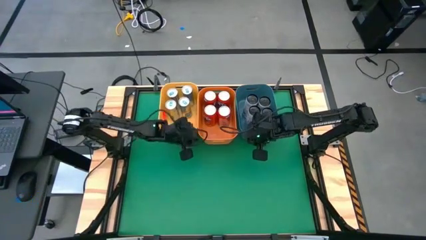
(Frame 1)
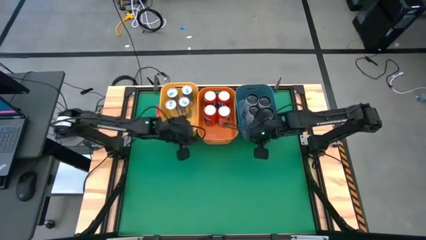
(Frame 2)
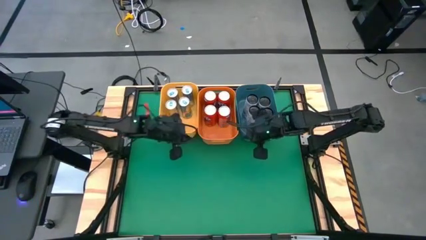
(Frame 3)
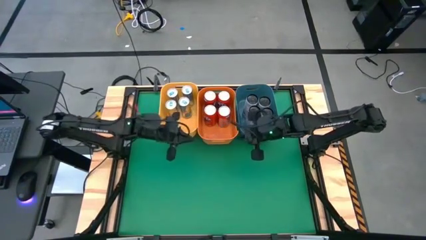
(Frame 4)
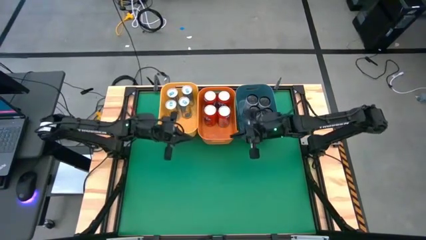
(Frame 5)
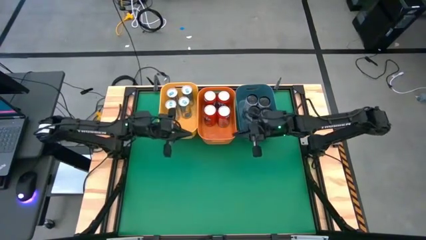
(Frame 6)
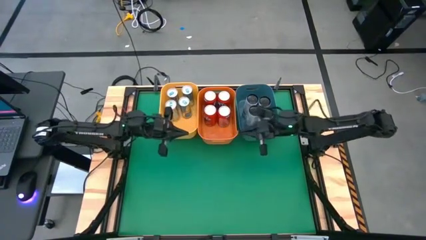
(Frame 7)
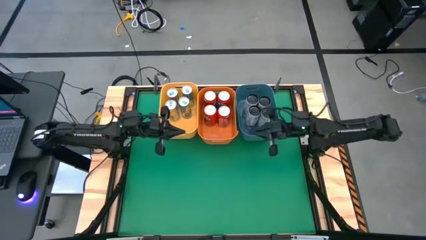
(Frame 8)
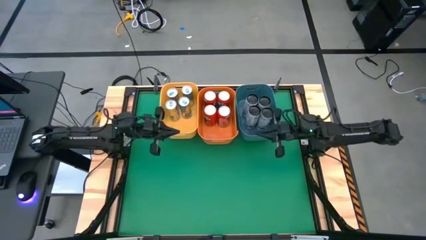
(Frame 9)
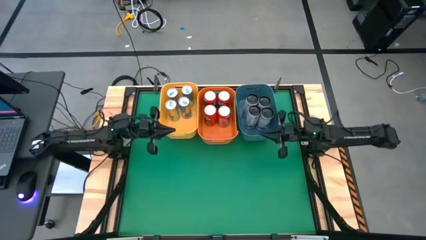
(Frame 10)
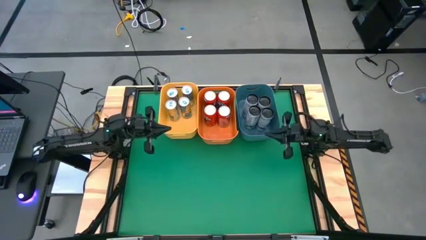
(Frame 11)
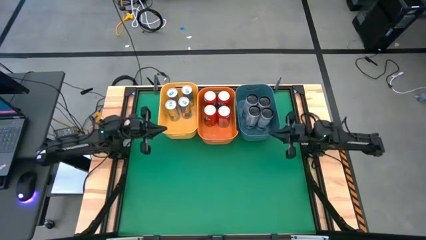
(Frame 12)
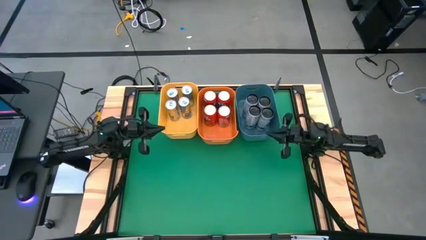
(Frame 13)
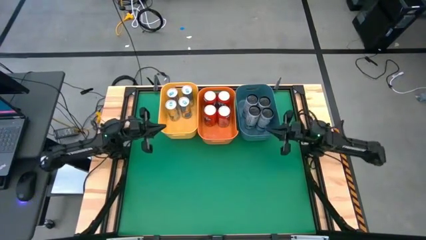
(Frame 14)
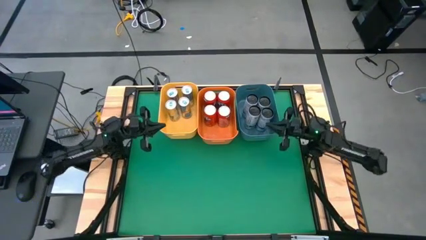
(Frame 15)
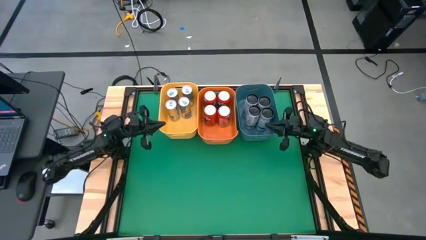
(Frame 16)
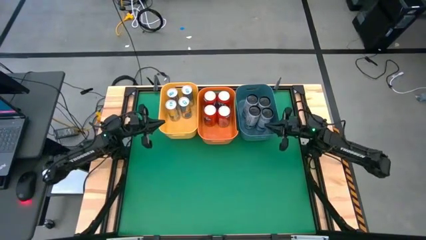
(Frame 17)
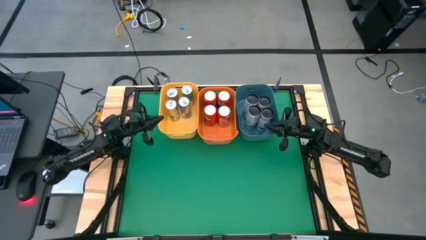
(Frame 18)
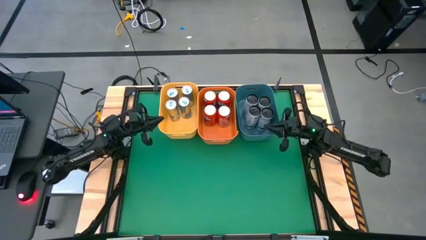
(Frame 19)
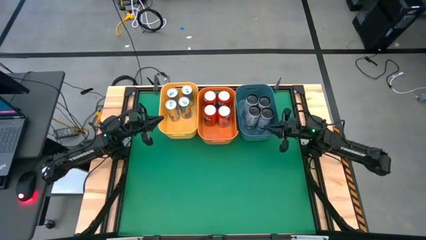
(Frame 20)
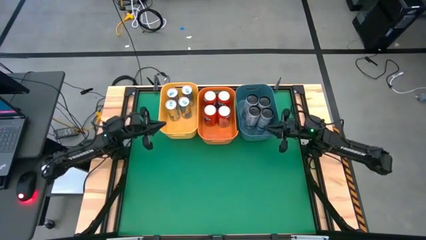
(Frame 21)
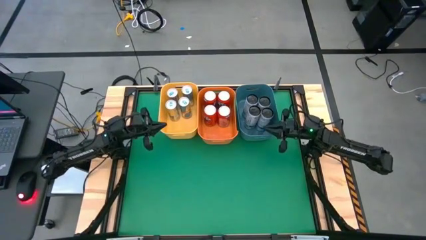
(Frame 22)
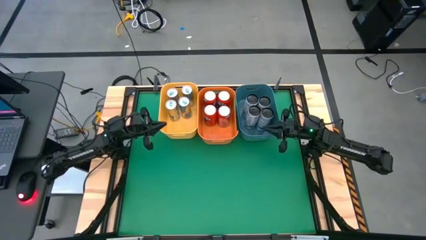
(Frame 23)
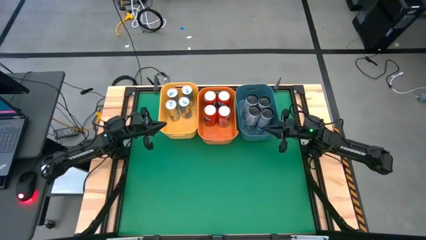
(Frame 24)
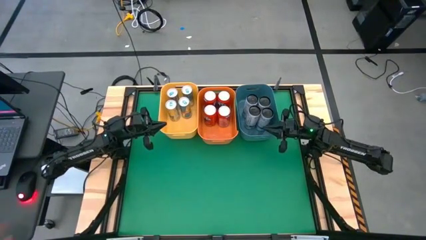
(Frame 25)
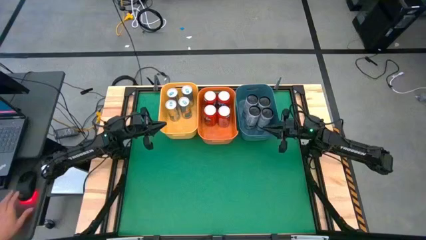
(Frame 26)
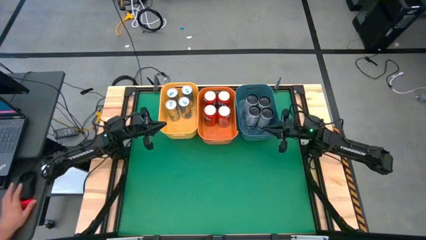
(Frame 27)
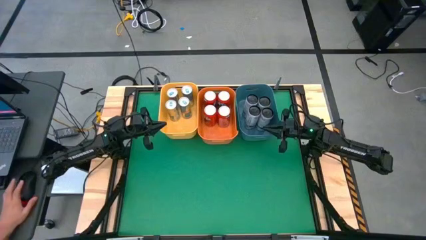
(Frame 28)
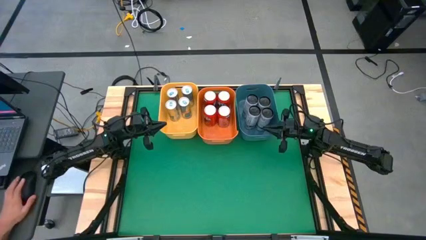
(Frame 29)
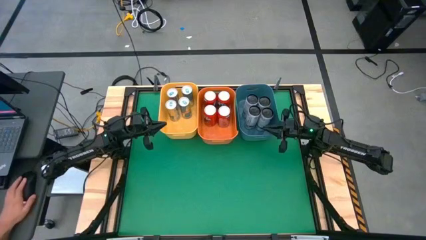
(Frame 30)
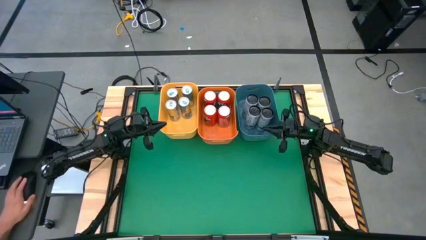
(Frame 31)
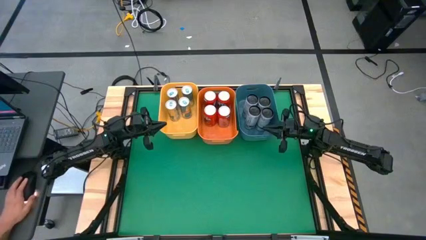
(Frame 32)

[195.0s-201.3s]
Task: Sort soda cans
Return to Home Position

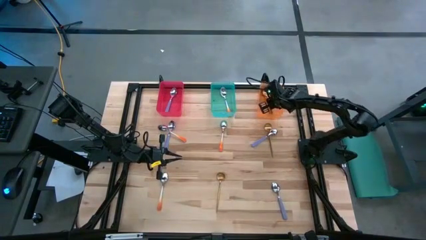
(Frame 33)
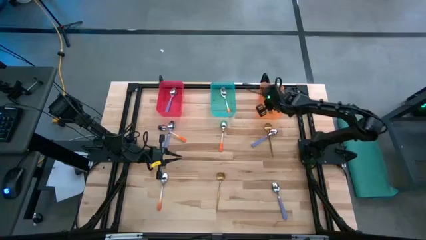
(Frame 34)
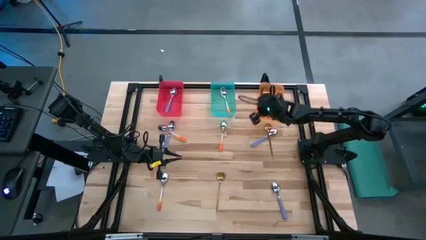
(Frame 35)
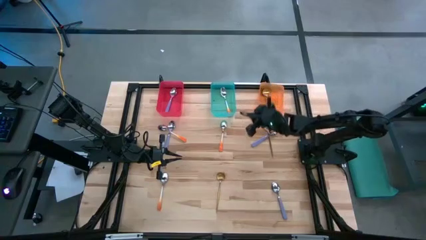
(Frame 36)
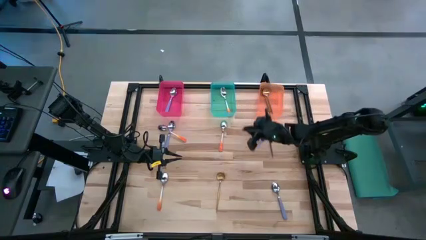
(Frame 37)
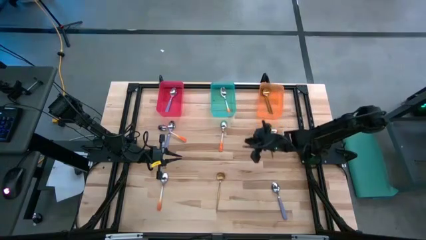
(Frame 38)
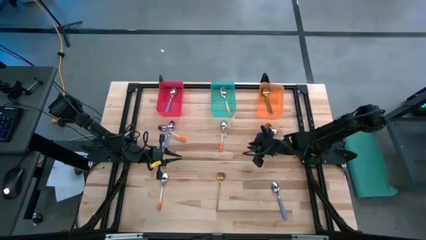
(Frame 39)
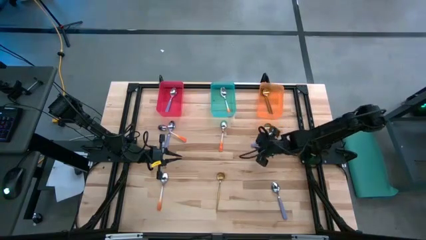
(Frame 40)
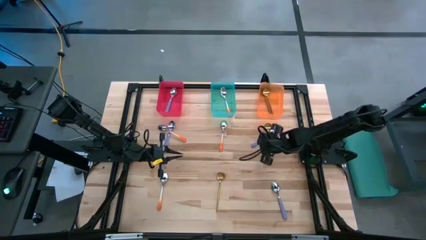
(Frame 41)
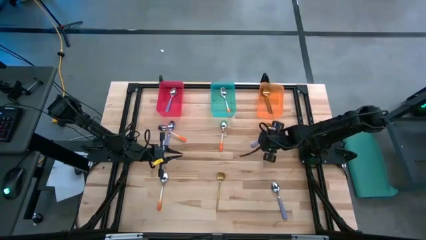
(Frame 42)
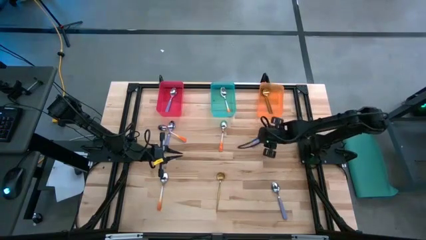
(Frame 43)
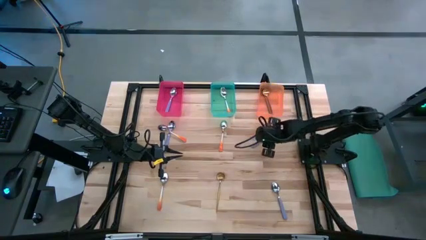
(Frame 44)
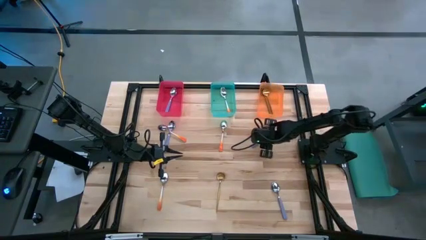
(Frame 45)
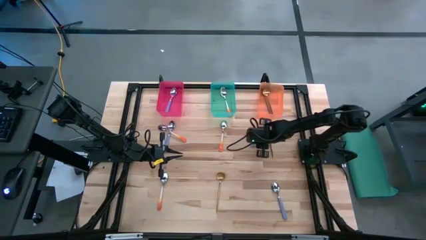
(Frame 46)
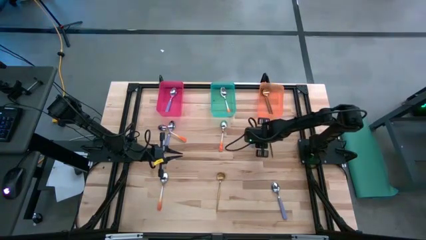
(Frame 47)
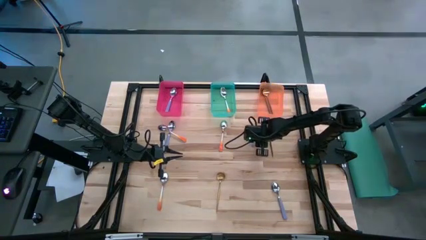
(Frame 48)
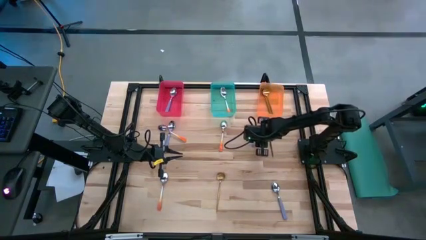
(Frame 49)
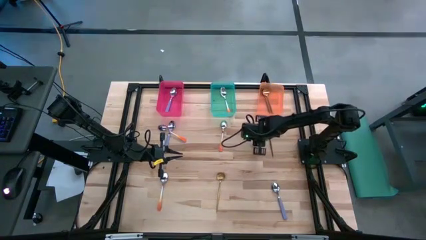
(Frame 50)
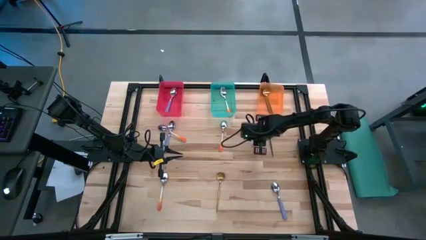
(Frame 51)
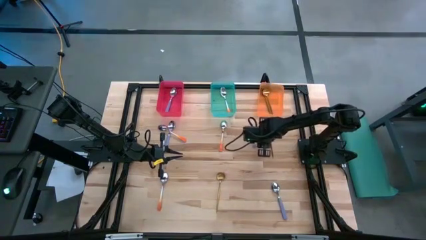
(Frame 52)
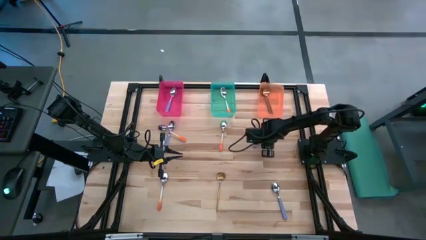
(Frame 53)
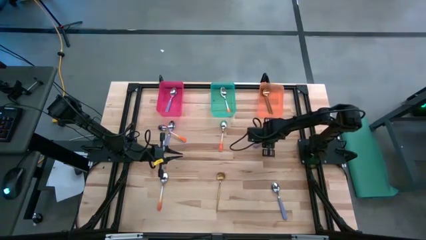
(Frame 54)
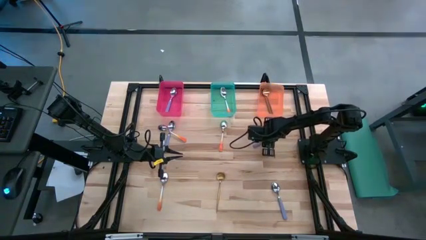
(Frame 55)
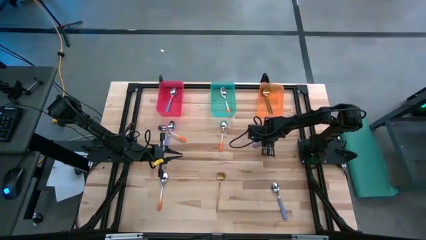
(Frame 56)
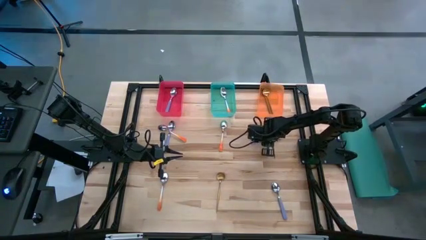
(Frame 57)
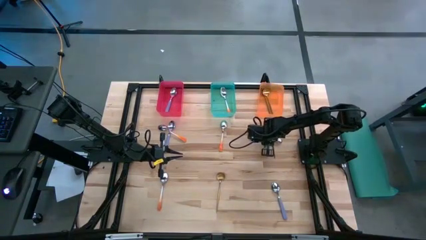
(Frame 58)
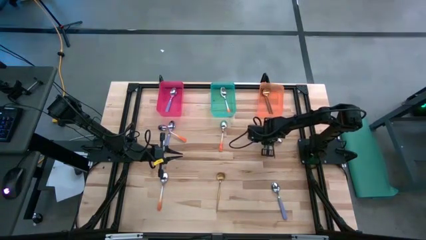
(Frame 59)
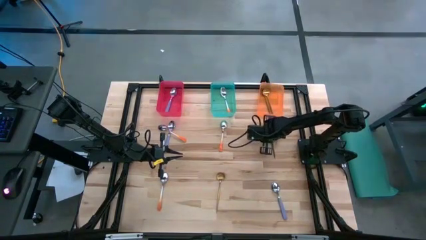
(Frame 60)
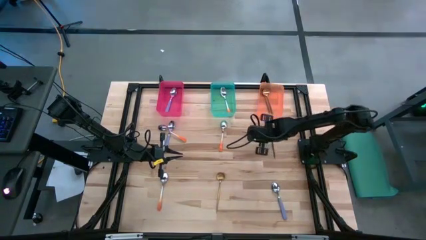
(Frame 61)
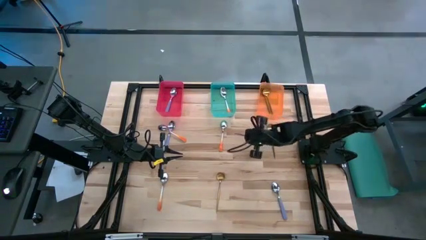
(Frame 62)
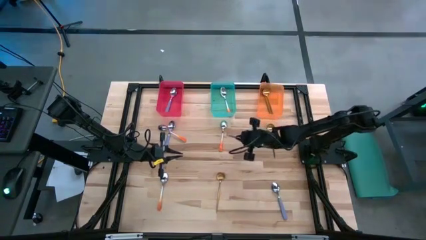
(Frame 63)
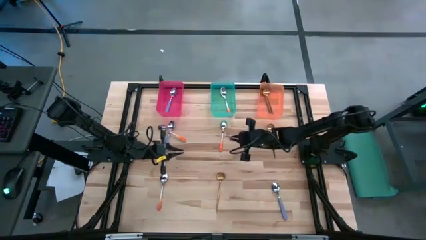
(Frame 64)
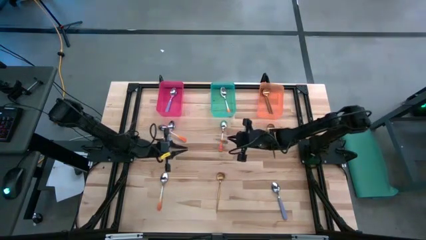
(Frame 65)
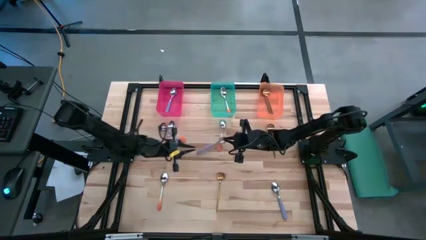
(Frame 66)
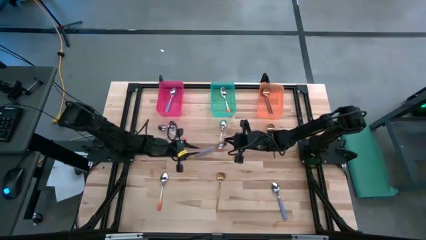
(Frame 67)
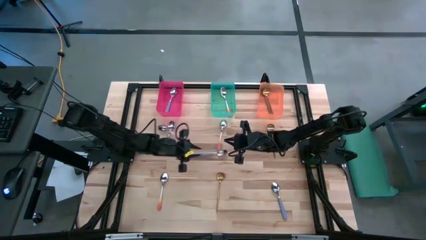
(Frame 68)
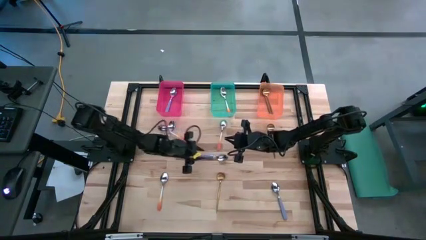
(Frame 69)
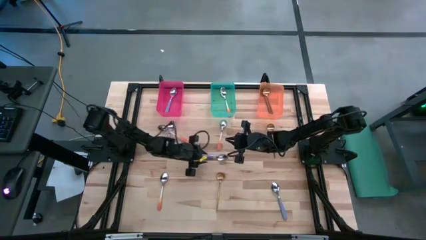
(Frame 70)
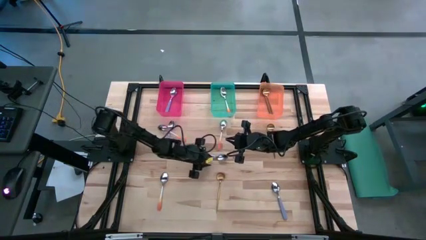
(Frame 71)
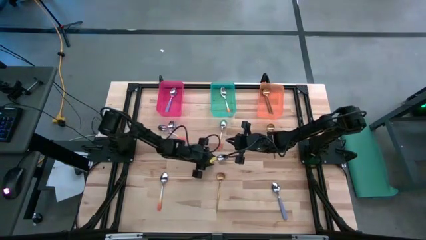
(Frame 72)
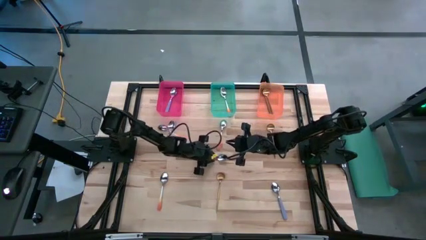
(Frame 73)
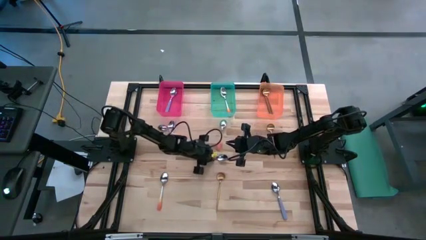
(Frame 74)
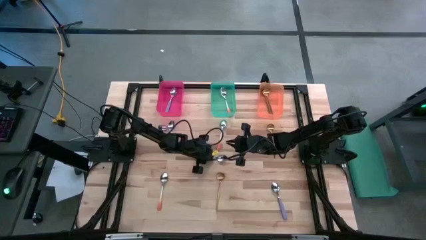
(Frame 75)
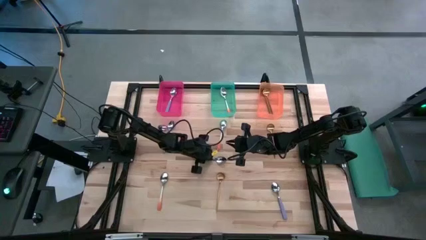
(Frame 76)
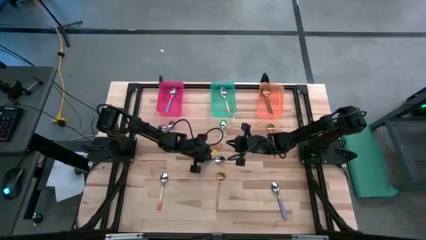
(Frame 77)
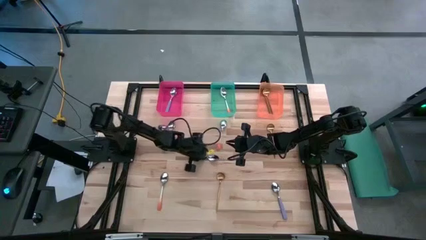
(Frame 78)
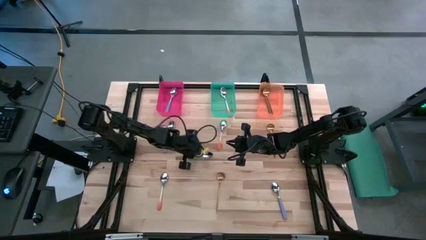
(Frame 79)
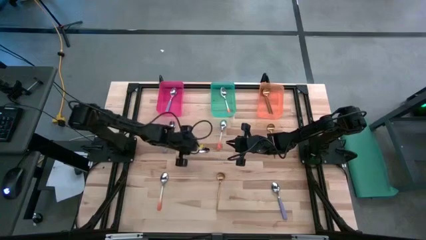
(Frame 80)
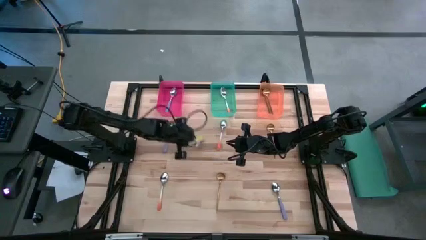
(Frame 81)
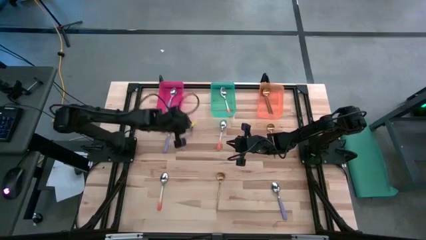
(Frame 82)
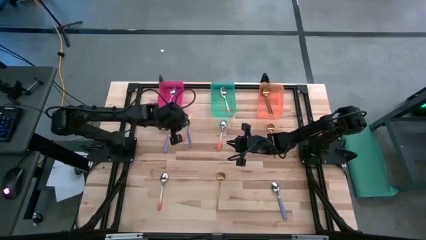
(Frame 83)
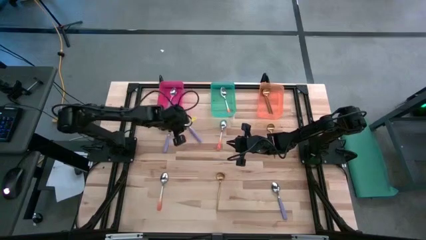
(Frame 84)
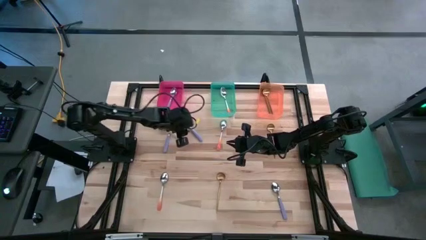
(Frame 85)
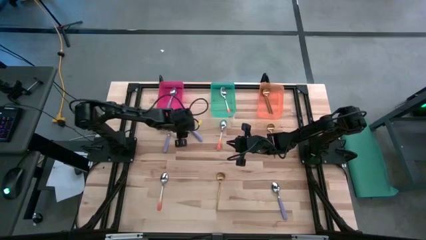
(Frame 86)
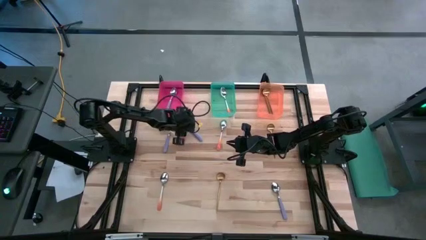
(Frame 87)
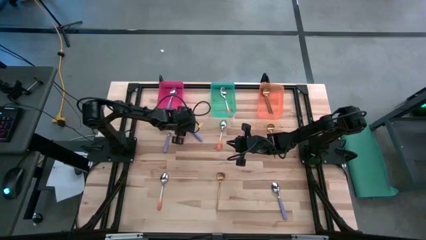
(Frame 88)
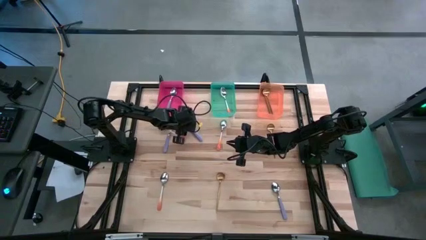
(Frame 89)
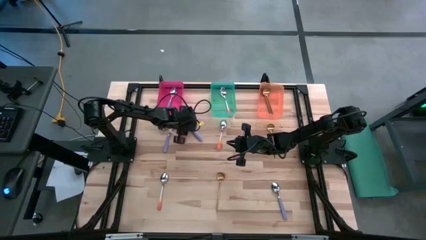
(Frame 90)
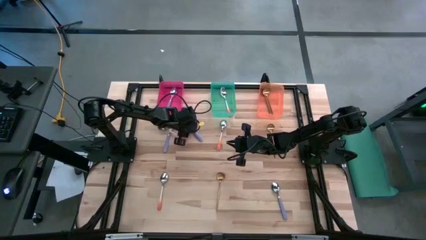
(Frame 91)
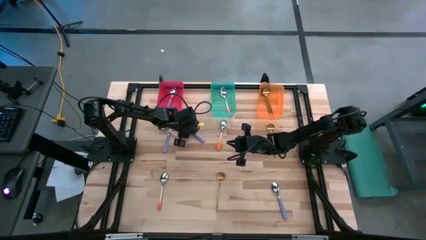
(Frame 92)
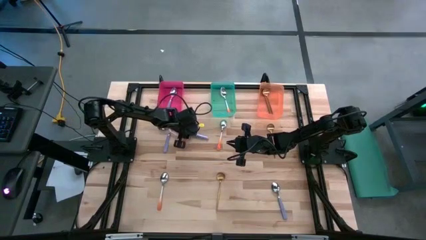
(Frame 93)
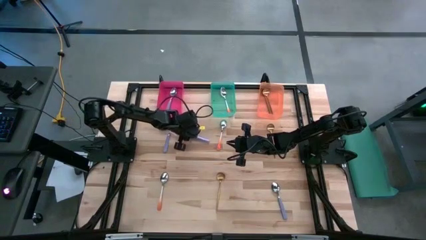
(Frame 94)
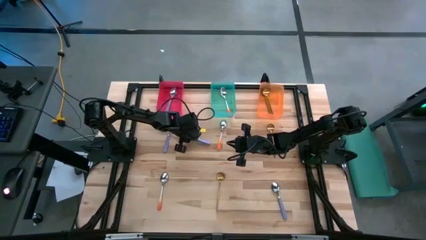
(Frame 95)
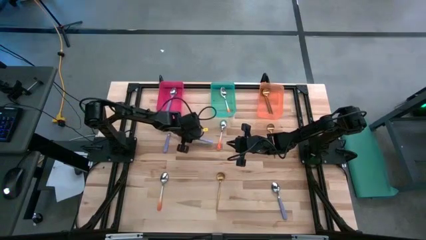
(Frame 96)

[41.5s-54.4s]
Task: Sort silverware by color (type)
Put the violet spoon into the red bin
